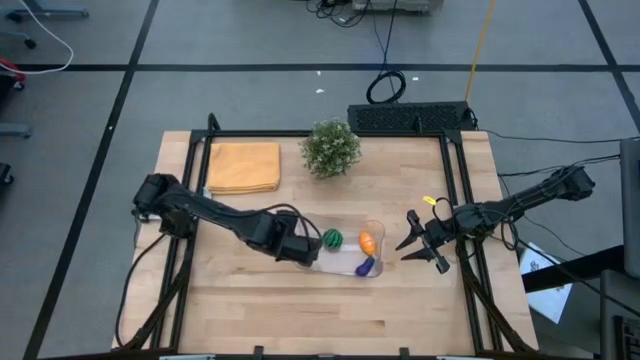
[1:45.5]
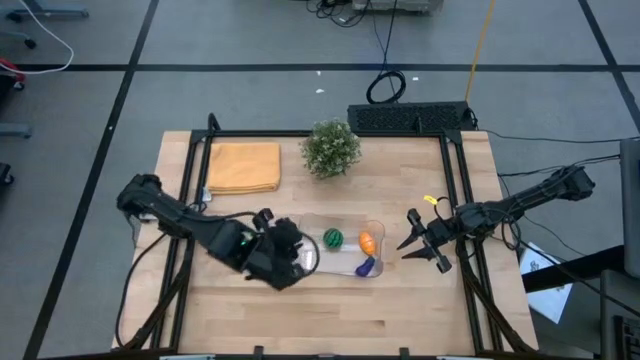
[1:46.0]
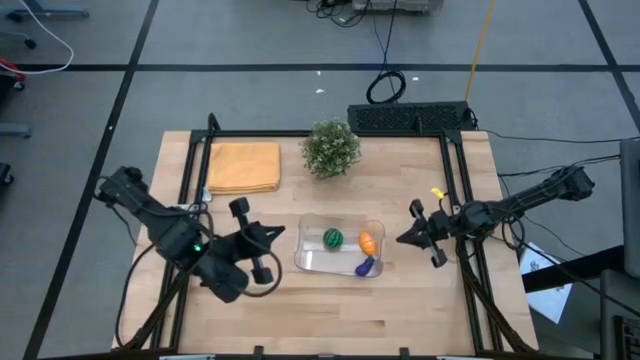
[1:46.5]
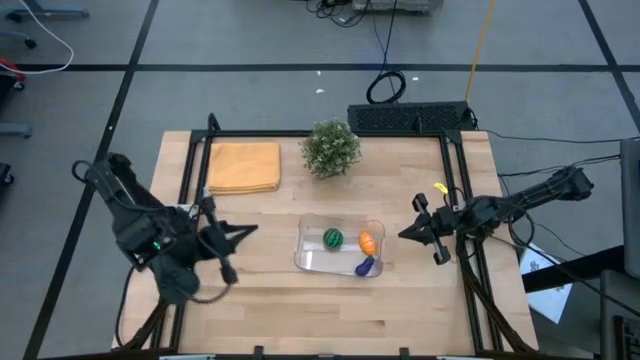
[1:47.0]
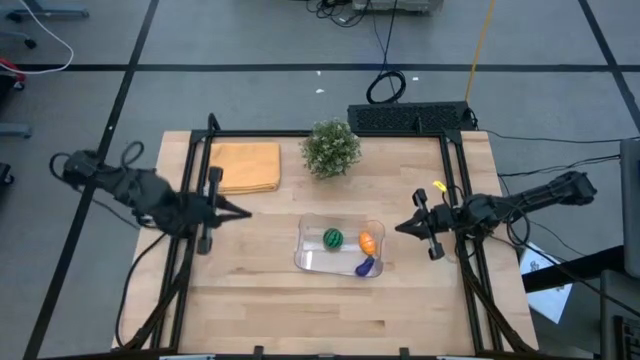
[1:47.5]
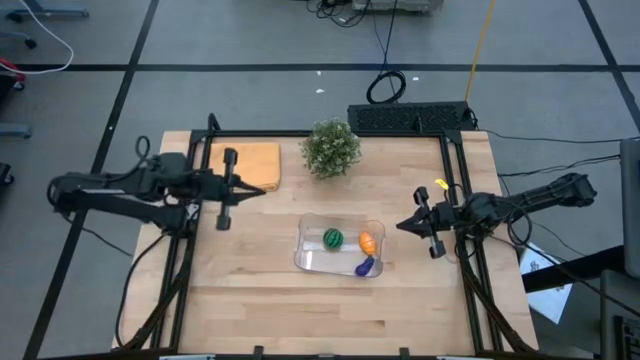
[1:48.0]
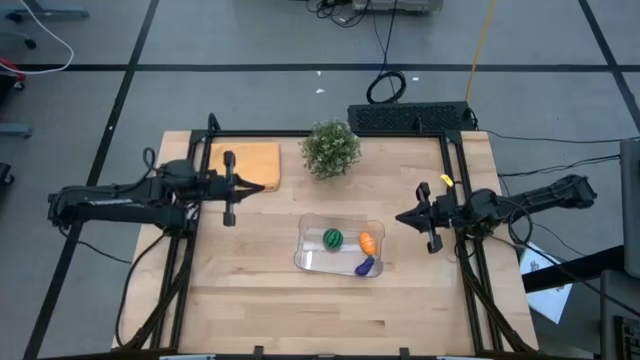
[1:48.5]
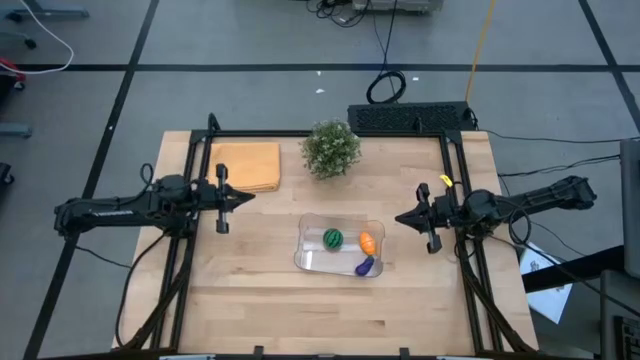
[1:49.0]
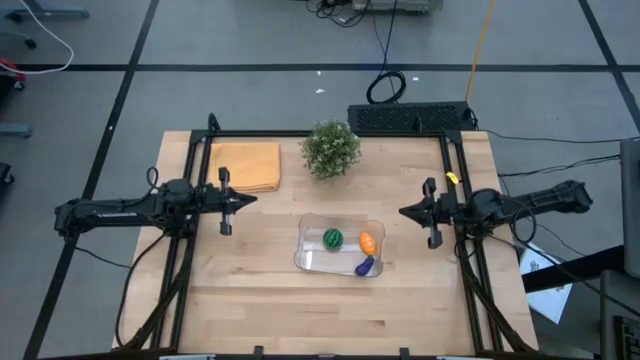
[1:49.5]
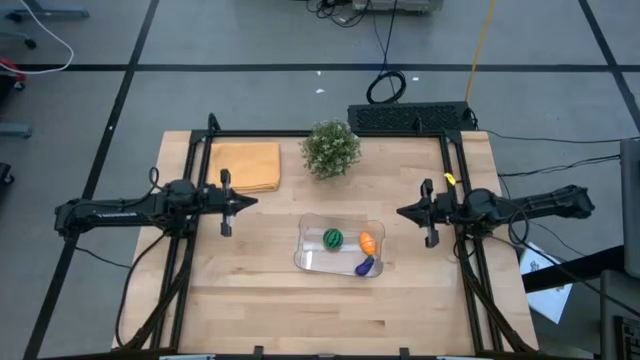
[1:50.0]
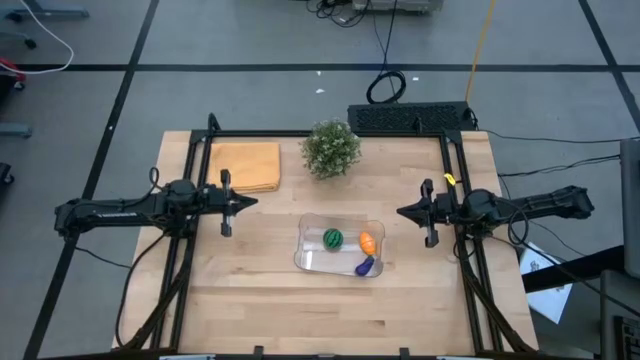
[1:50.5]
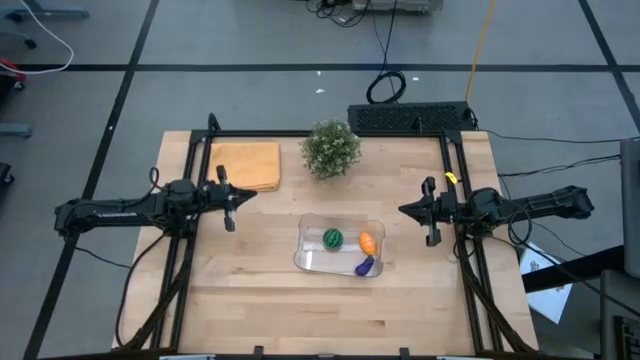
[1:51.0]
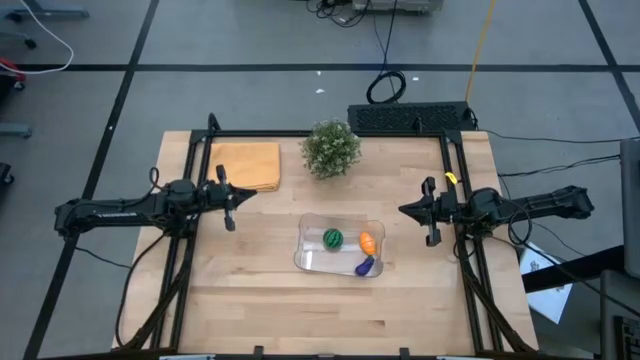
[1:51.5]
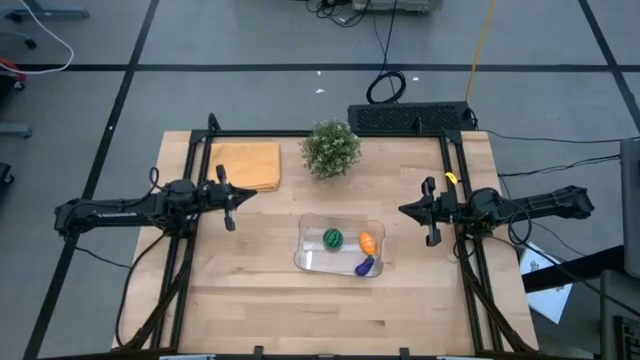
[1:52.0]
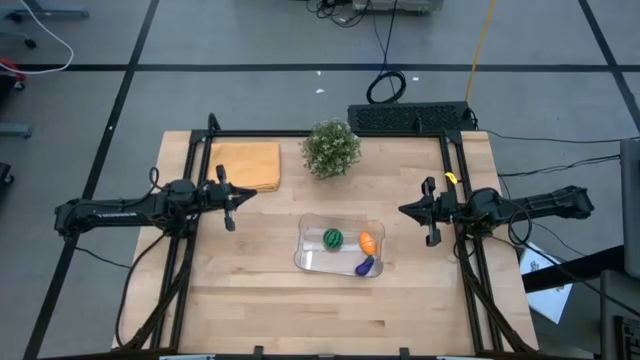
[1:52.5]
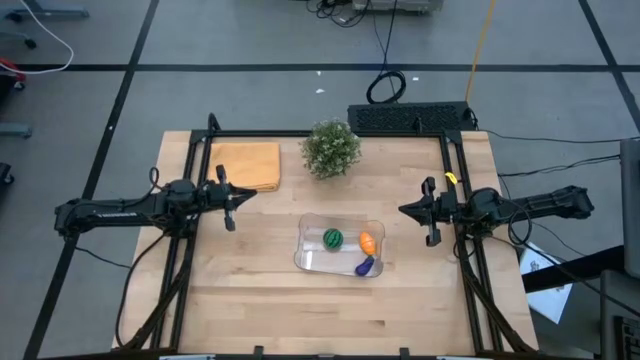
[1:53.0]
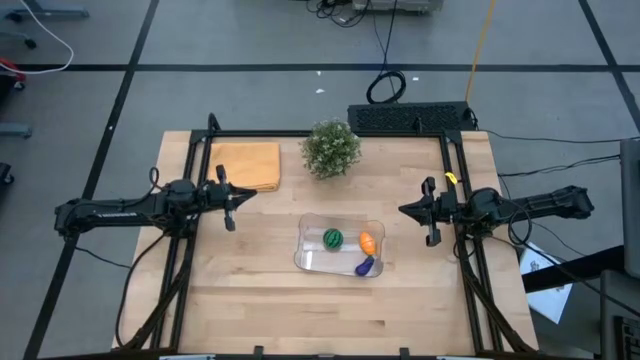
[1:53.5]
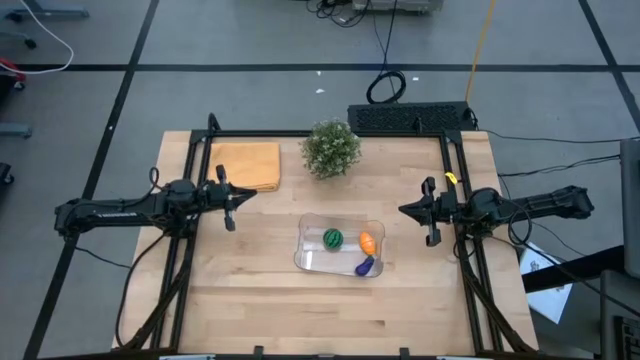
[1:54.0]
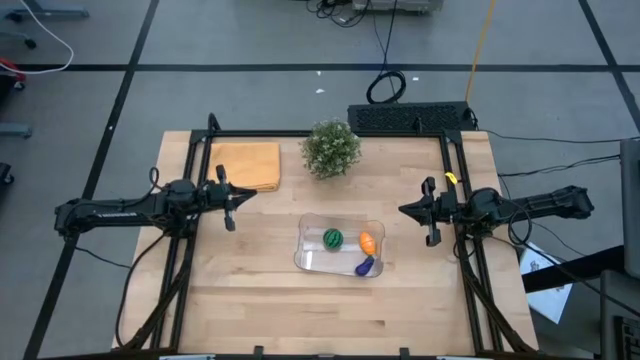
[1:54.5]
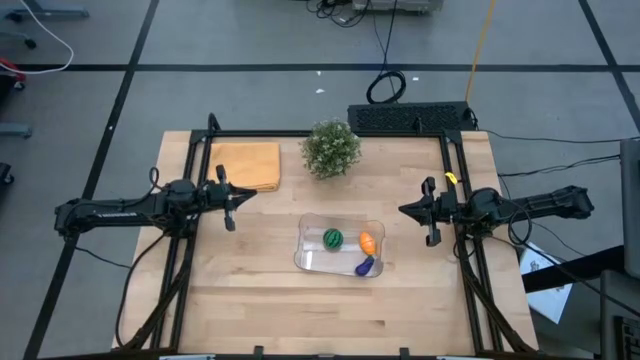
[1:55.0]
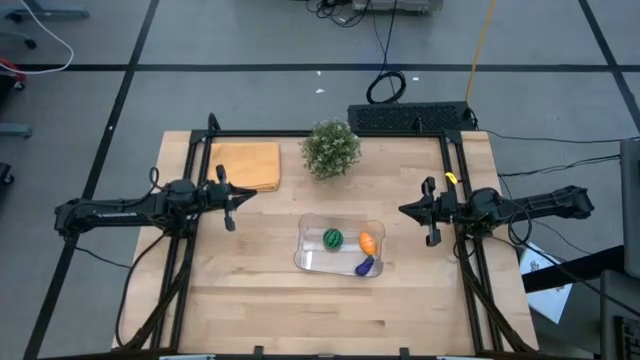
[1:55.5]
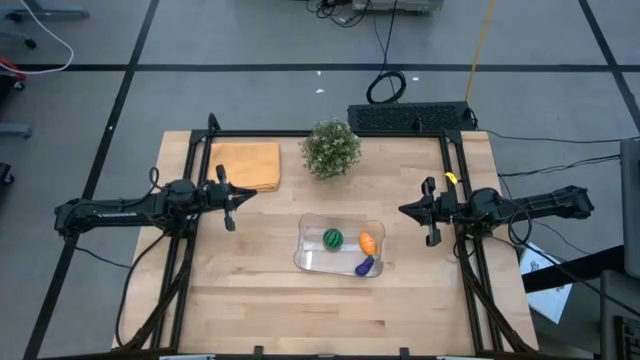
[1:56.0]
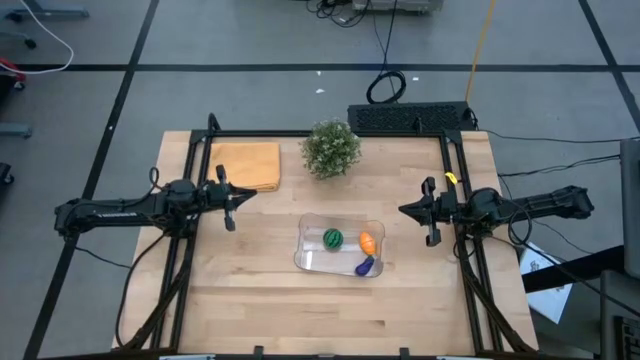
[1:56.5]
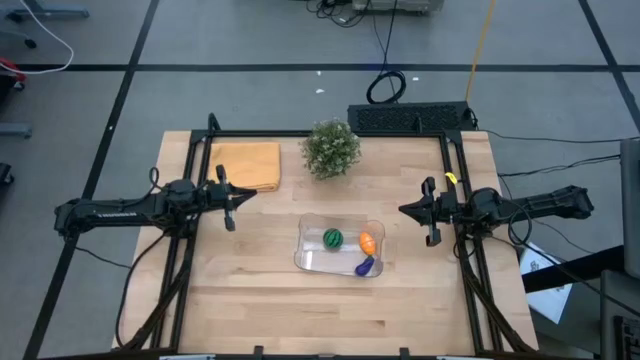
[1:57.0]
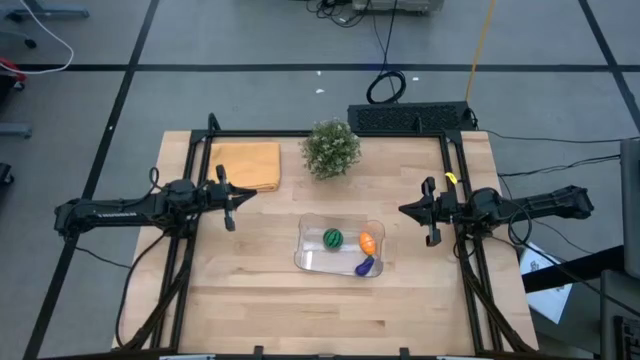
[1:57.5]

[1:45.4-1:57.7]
Task: Pick and placing Produce into tupperware
Return to Home Position

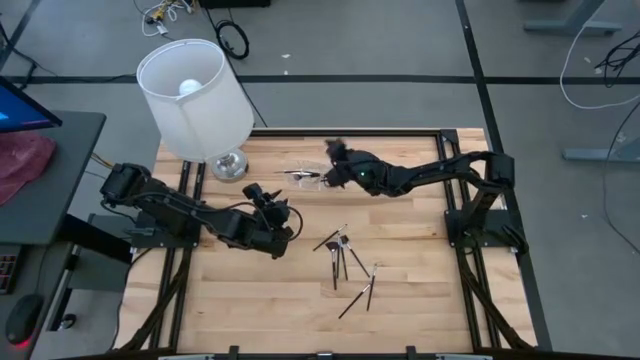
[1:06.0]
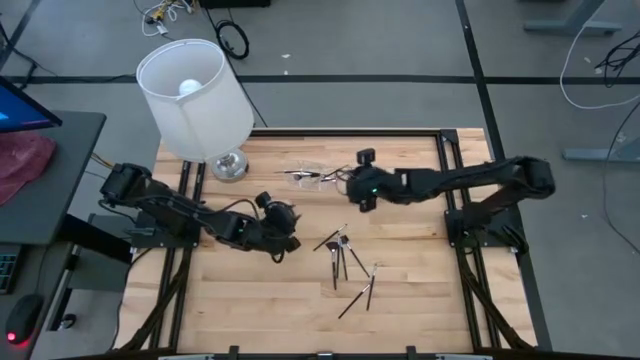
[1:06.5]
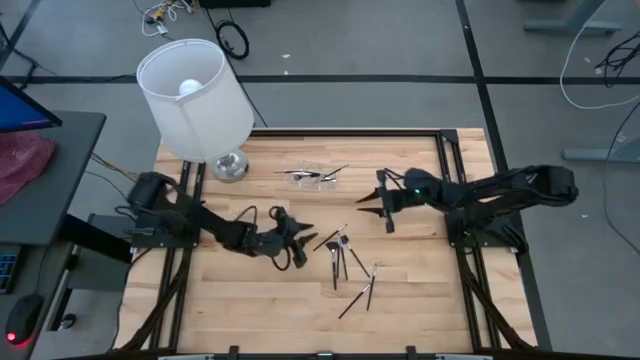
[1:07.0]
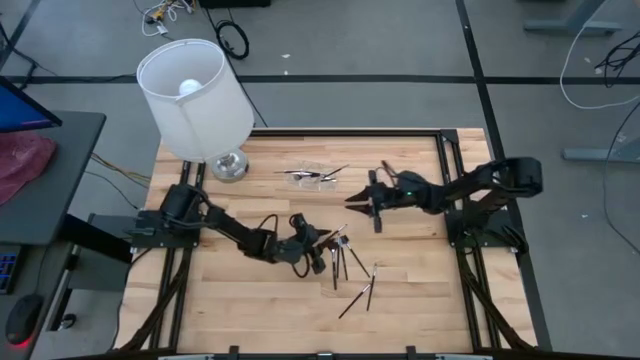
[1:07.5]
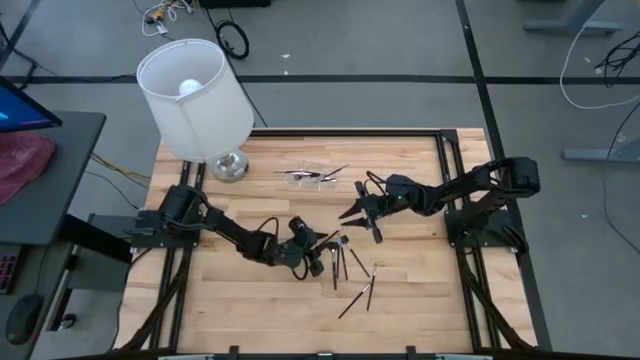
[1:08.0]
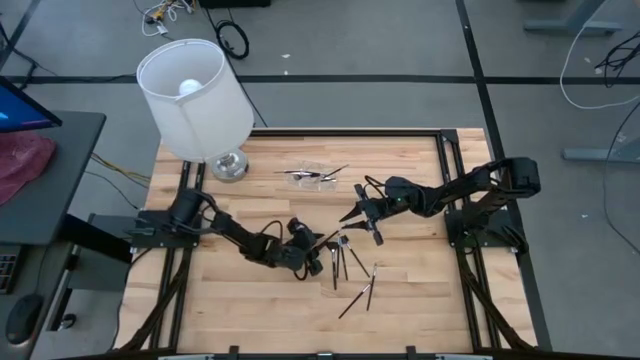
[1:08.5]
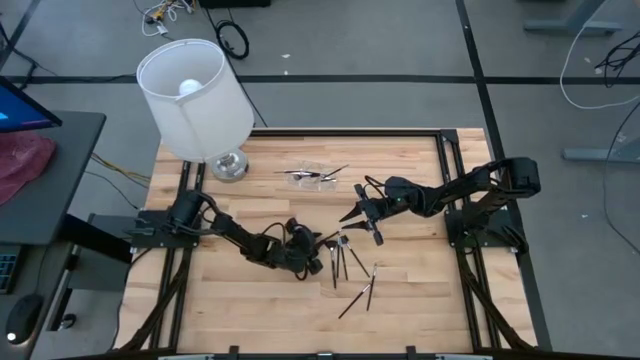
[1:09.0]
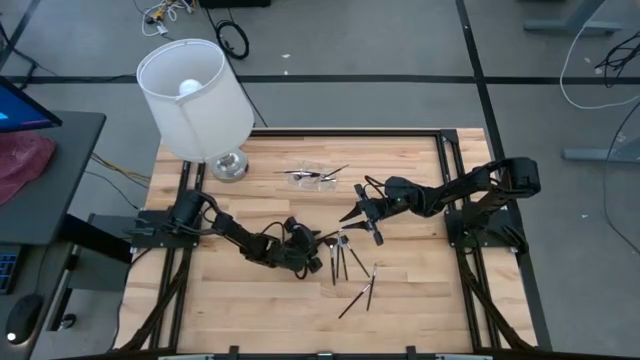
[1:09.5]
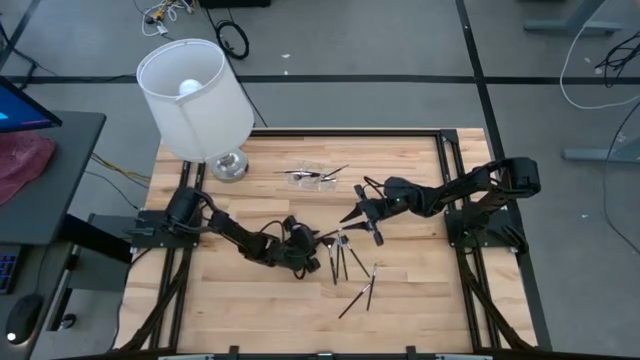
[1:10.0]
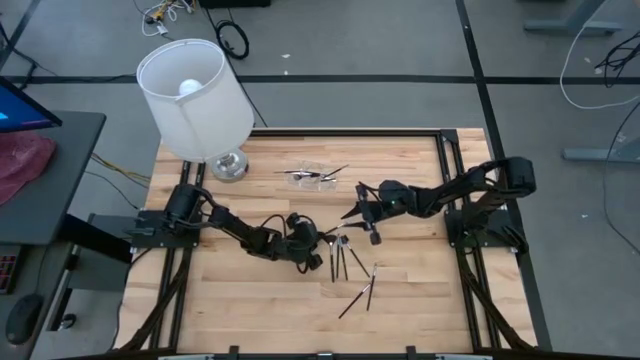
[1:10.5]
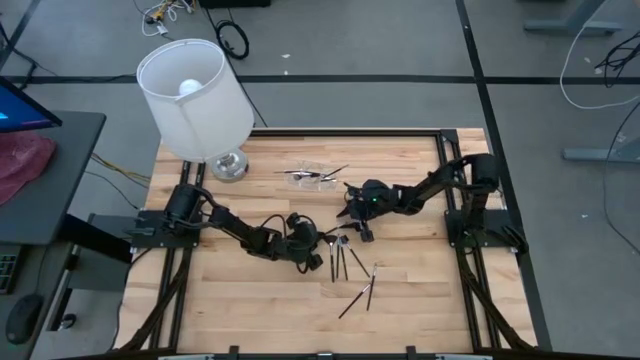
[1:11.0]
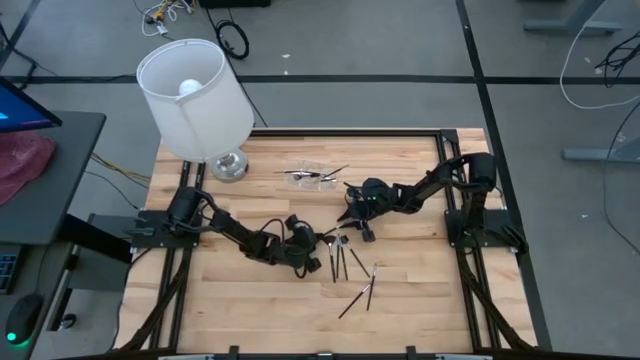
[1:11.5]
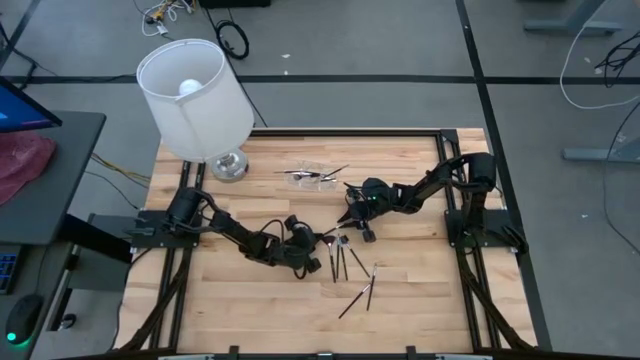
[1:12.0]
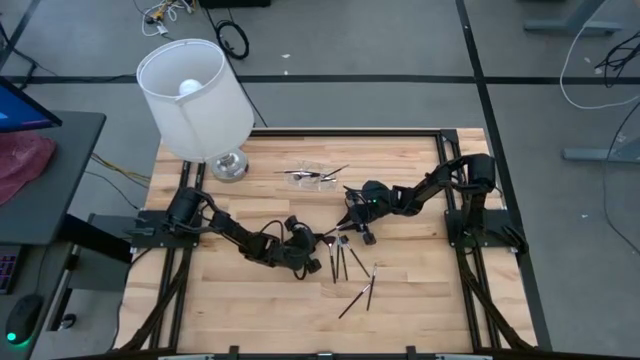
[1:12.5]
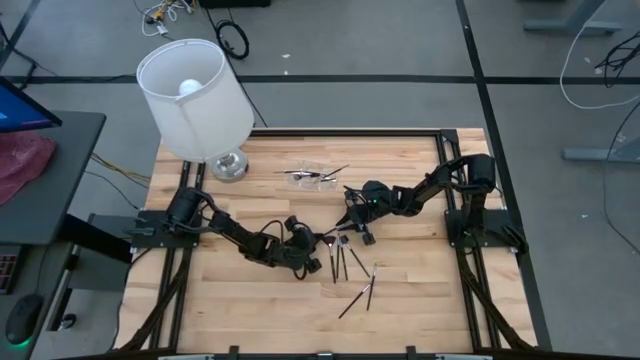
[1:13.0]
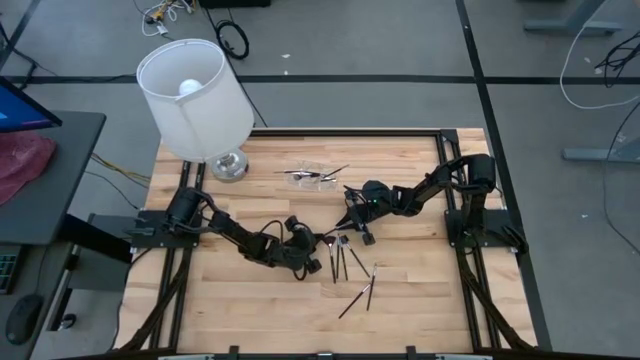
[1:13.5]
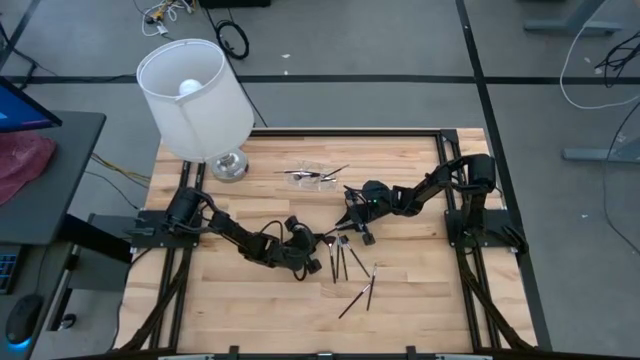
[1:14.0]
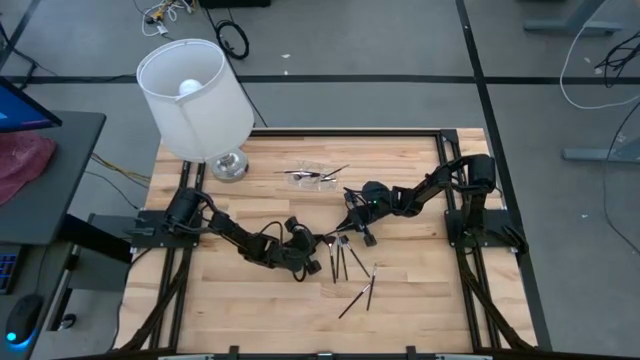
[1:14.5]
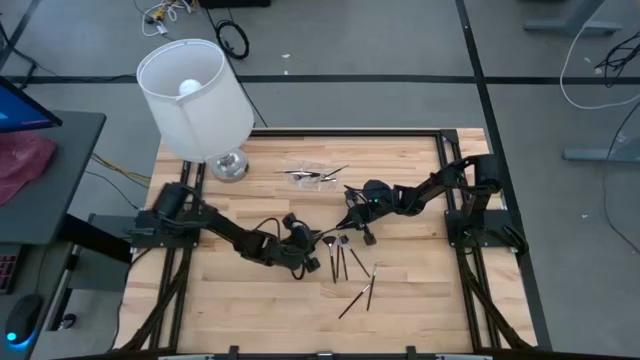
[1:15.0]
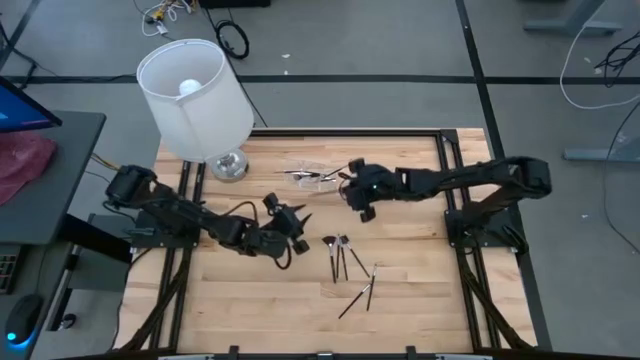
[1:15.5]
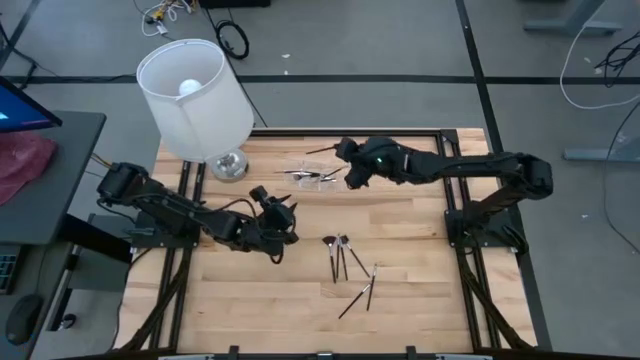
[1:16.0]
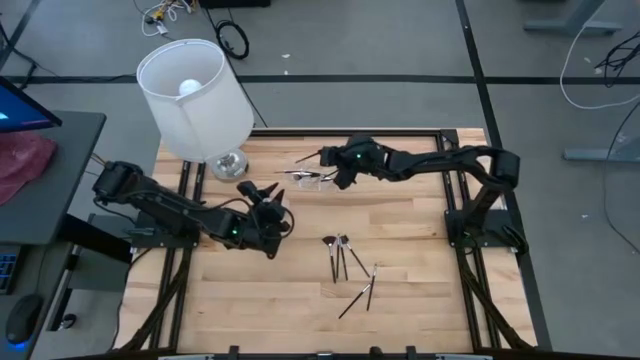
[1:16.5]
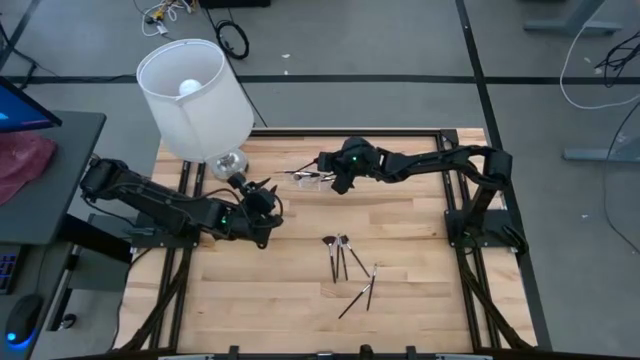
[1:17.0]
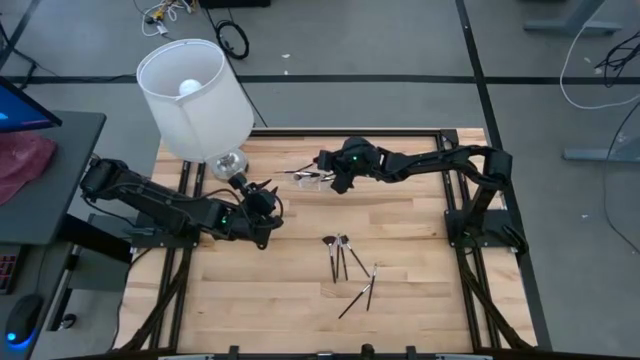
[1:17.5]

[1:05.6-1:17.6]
Task: Put items in baskets/containers
Put the black eyeshadow brush into the transparent organizer
